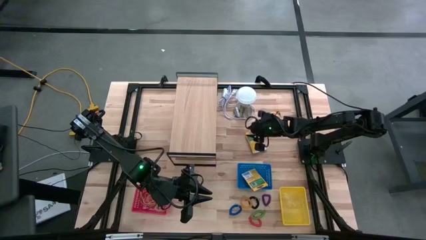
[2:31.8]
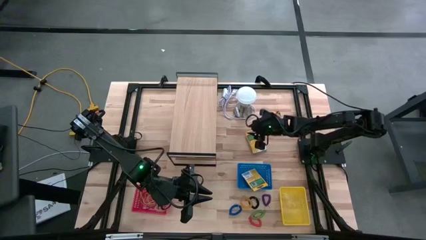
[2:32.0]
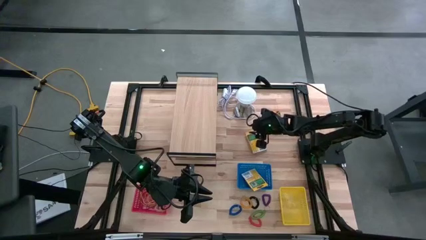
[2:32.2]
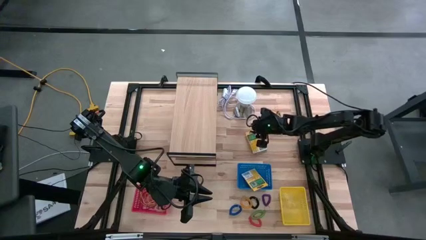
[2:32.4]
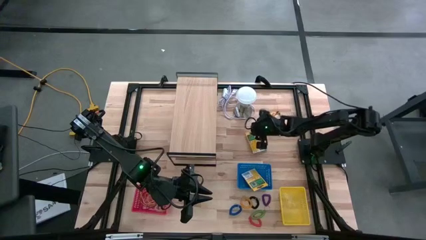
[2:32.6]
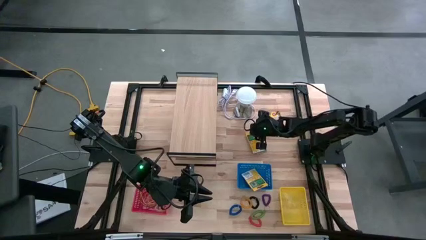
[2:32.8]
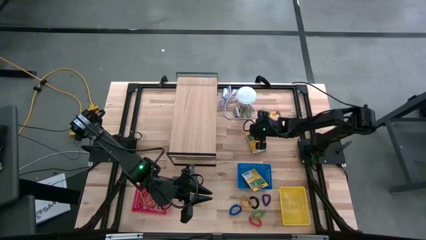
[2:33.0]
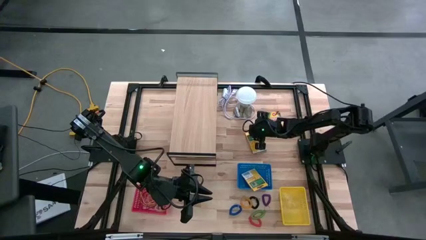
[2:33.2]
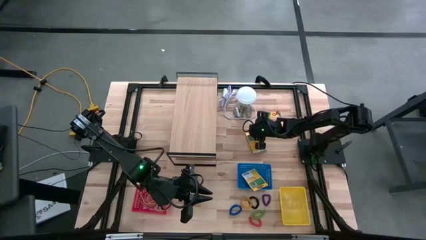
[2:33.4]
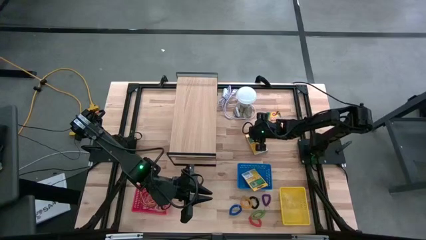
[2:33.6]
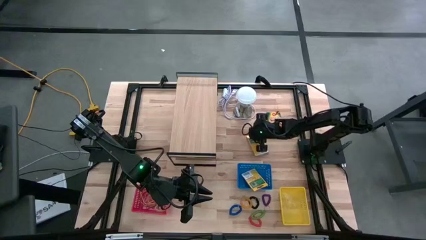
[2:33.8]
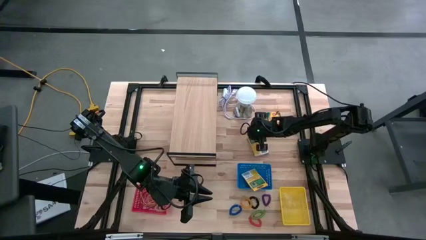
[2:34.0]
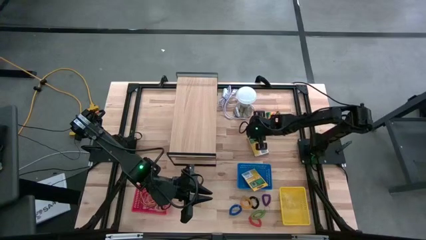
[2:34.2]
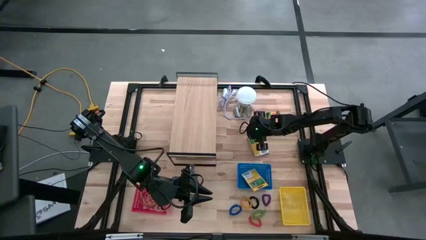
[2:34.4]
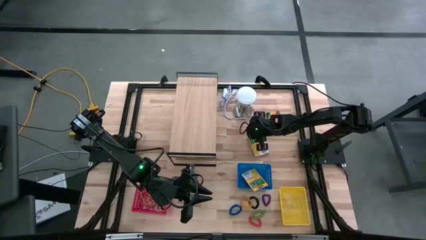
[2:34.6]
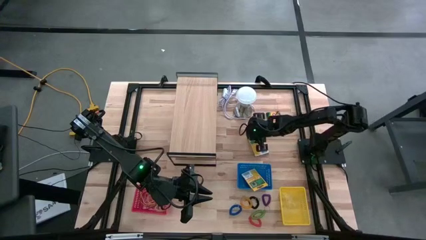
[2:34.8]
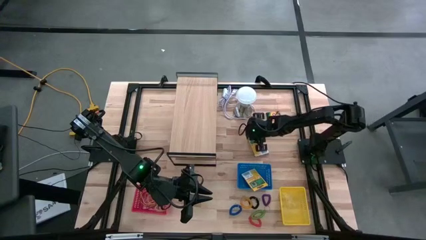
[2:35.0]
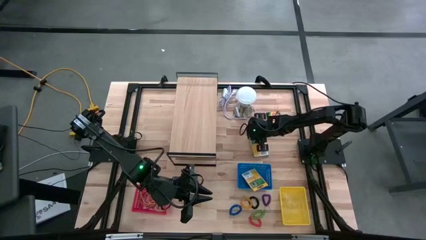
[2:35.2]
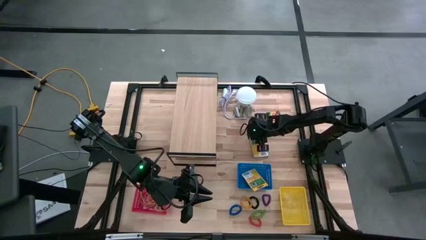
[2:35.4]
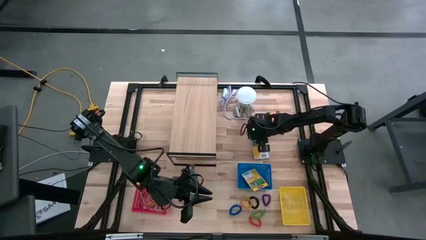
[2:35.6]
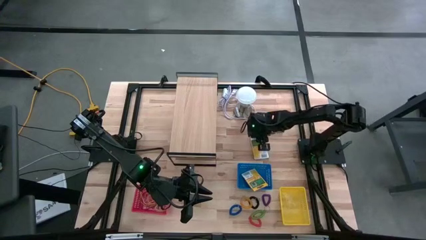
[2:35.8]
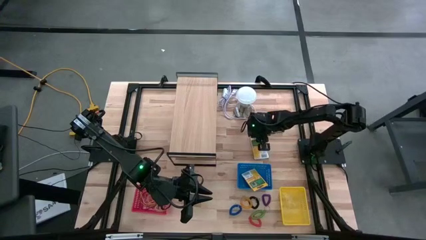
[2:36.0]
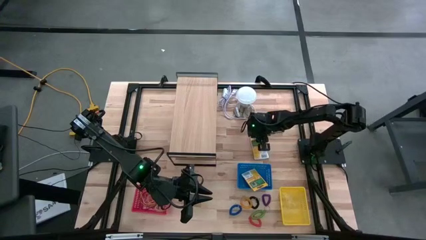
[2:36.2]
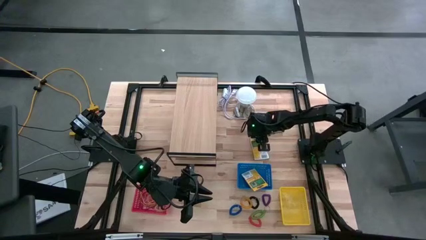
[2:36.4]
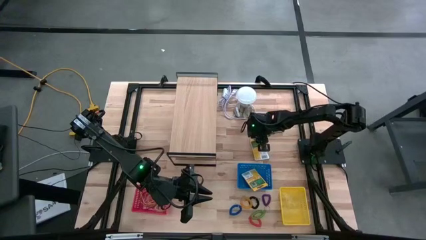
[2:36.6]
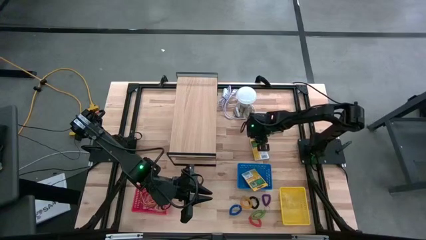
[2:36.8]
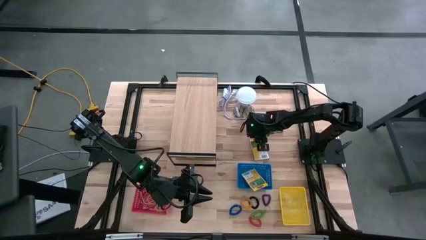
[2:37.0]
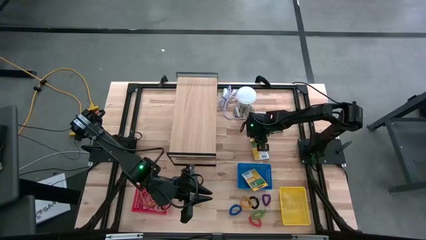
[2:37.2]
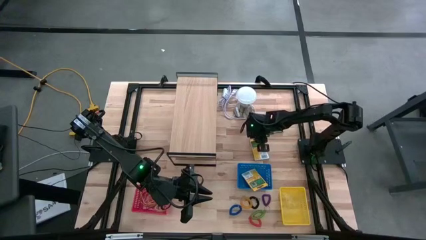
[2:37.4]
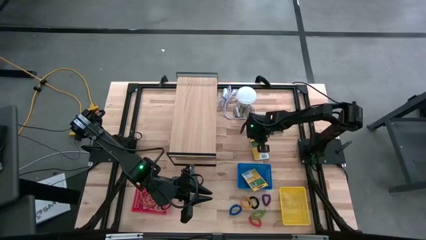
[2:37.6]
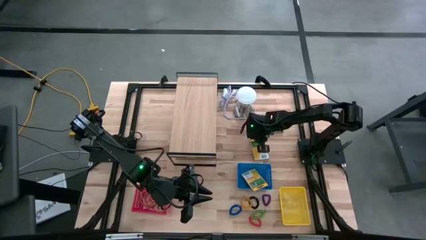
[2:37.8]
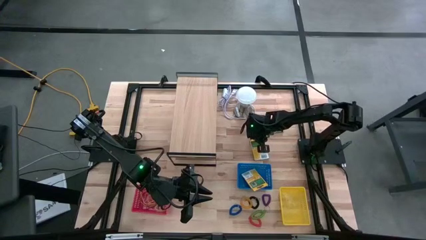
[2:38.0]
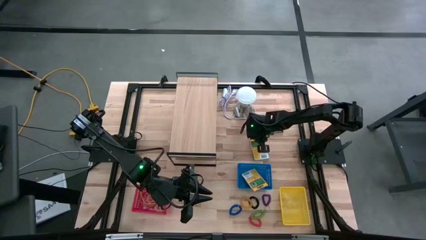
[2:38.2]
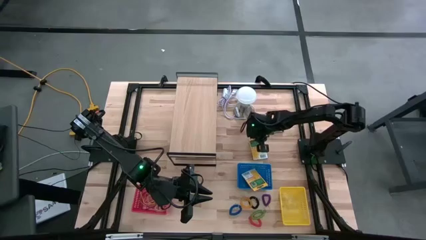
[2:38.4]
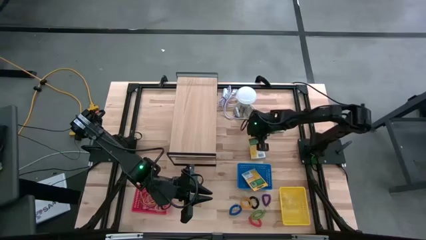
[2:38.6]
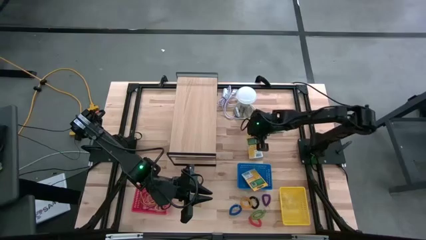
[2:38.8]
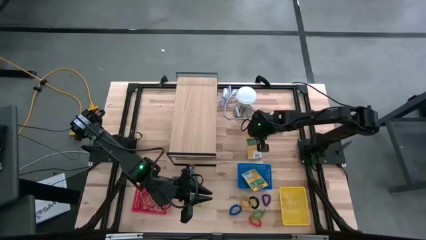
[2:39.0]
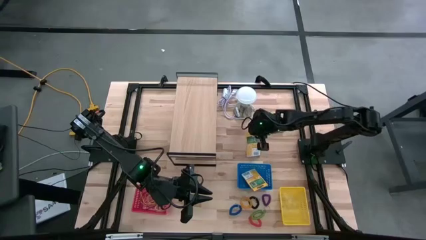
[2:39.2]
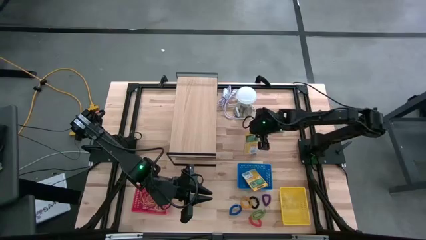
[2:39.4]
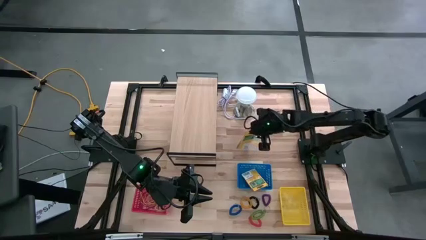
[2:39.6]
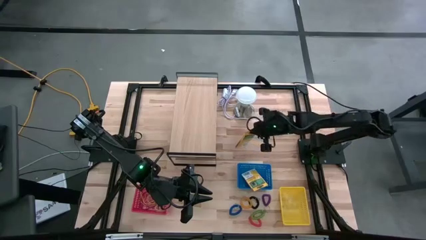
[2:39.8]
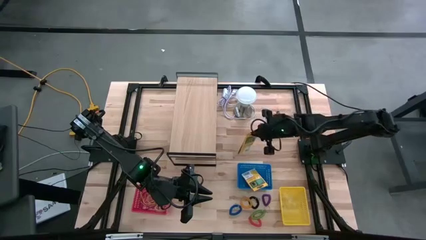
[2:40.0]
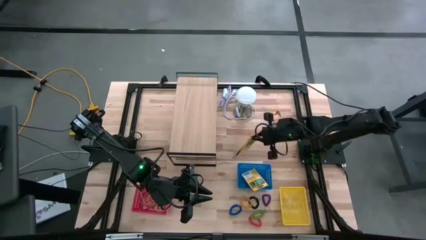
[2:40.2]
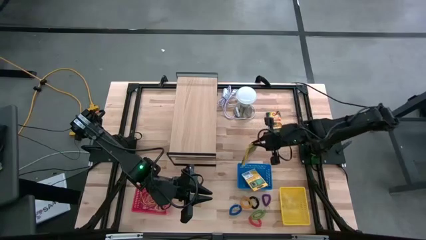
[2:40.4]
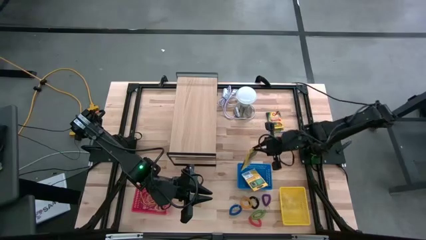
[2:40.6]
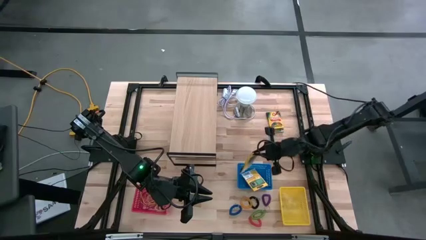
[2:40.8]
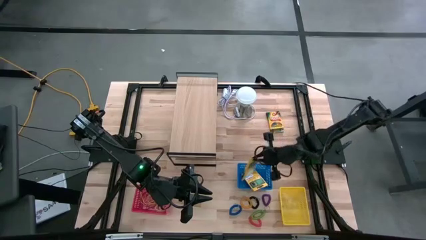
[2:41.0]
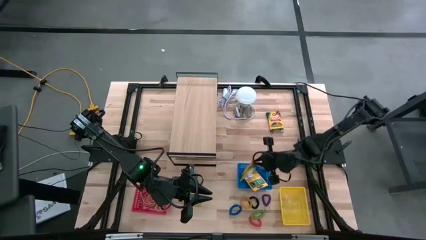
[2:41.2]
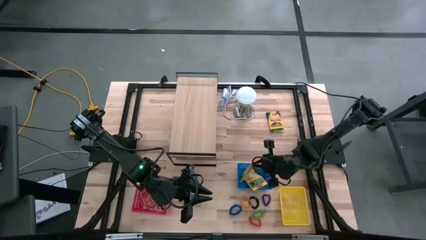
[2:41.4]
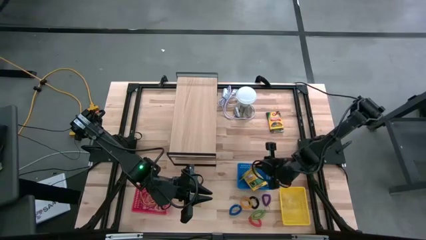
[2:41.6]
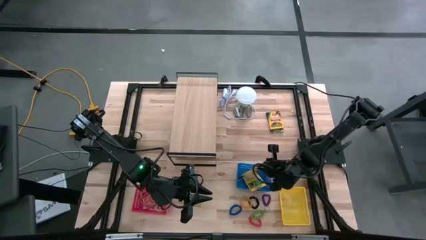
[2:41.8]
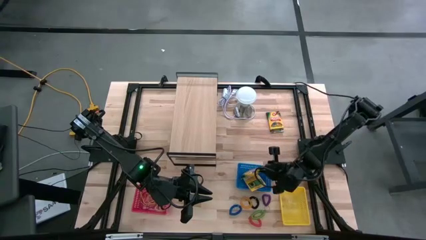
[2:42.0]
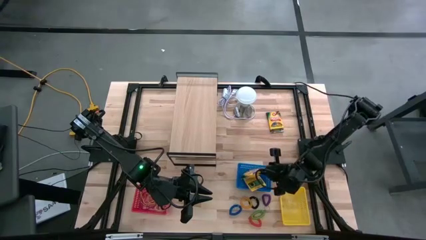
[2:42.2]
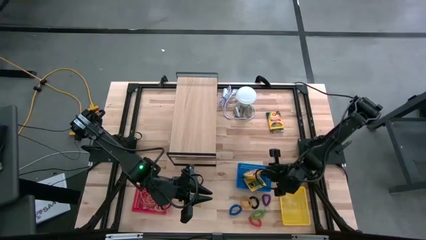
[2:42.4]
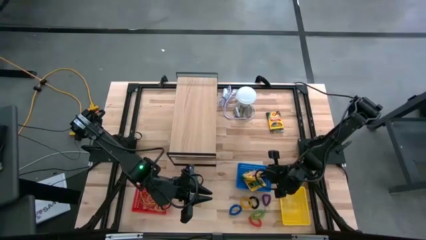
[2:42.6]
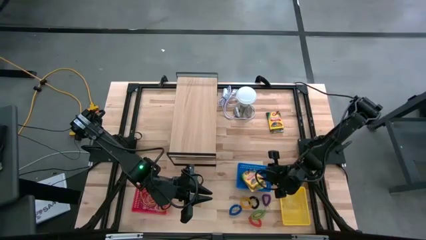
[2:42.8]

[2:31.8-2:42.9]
Task: Pick & Place Office Desk Supplies
Put the left yellow crayon box into the blue bin

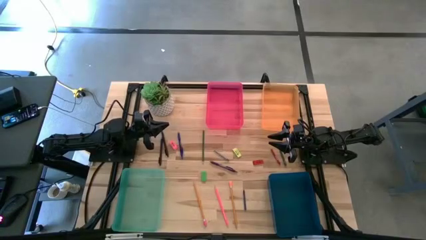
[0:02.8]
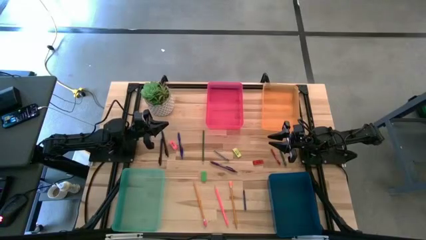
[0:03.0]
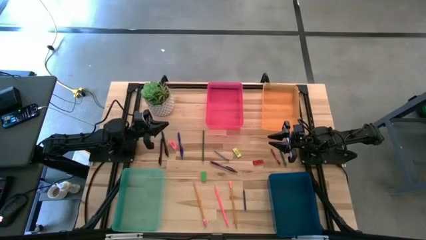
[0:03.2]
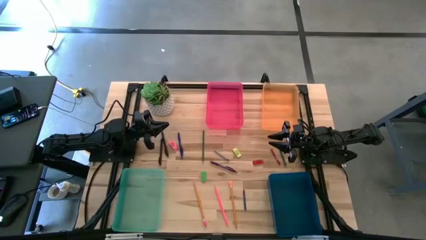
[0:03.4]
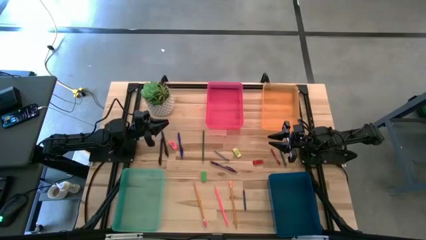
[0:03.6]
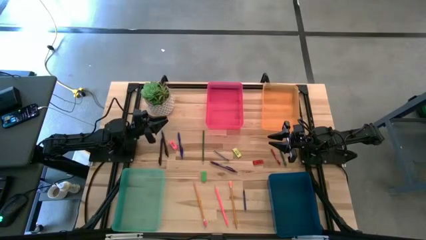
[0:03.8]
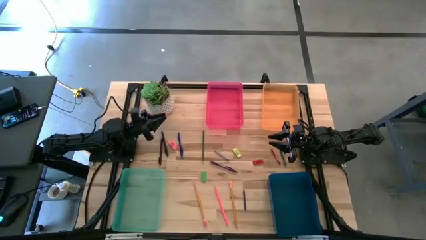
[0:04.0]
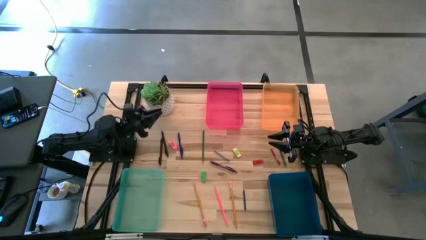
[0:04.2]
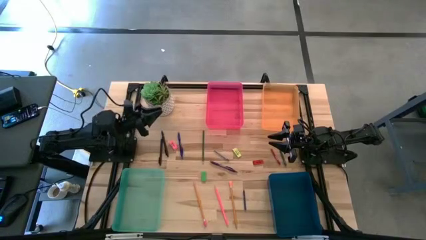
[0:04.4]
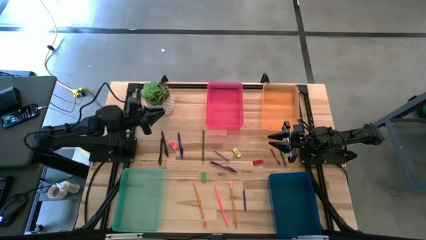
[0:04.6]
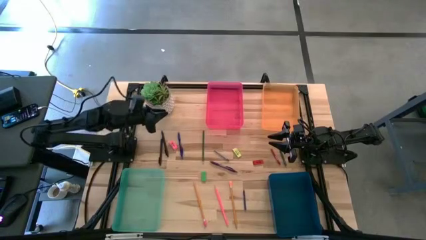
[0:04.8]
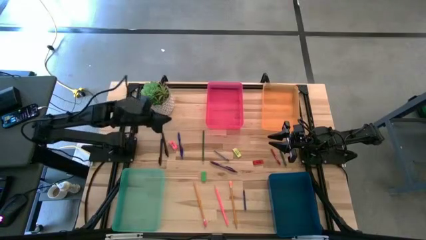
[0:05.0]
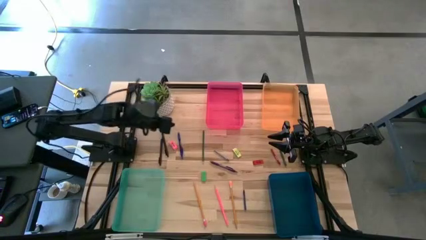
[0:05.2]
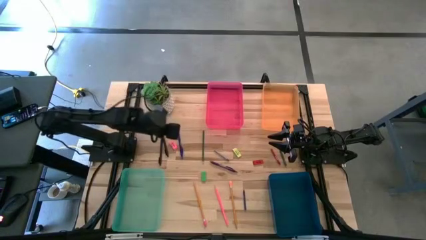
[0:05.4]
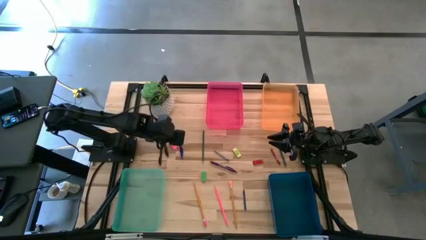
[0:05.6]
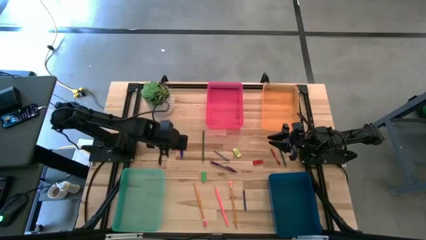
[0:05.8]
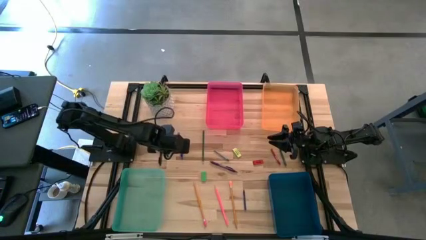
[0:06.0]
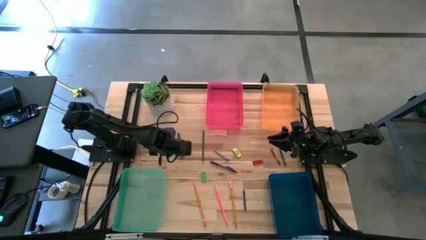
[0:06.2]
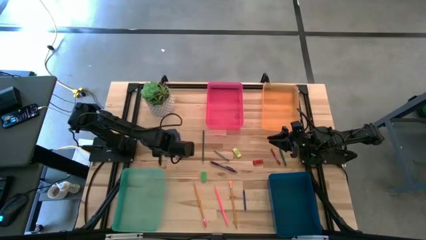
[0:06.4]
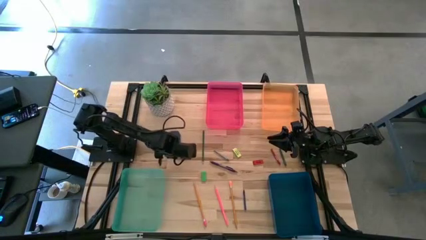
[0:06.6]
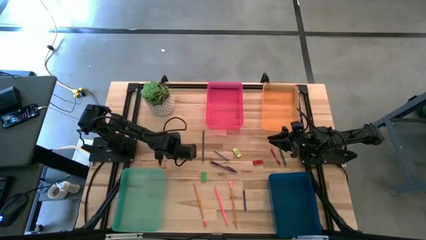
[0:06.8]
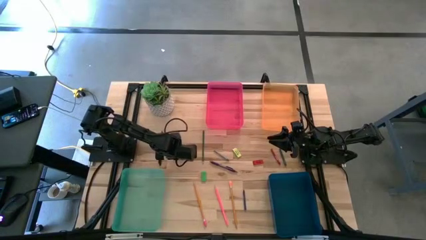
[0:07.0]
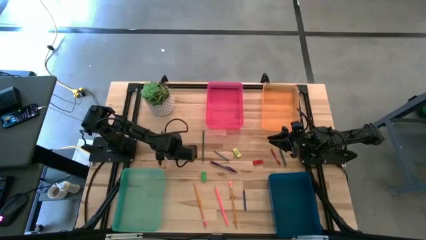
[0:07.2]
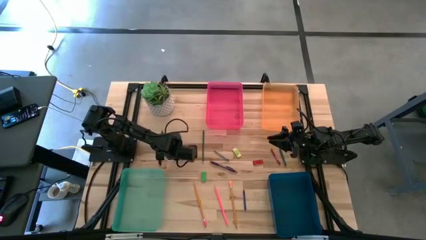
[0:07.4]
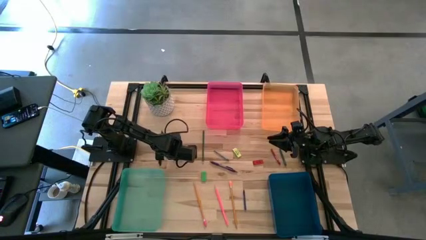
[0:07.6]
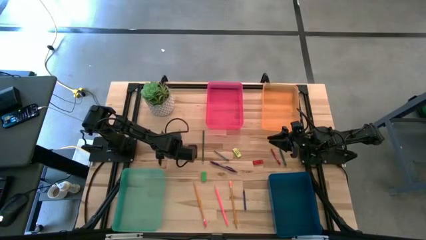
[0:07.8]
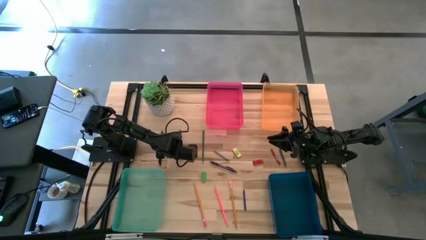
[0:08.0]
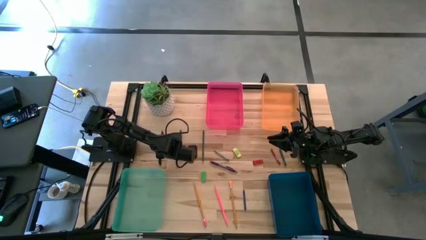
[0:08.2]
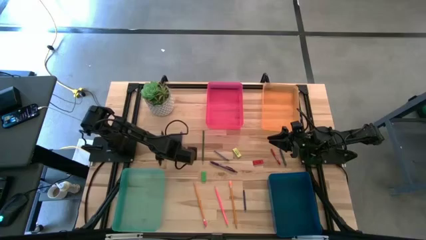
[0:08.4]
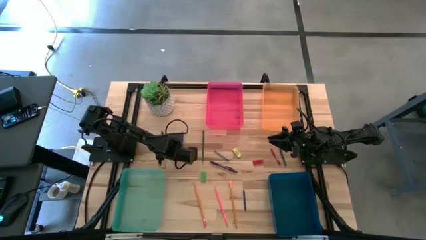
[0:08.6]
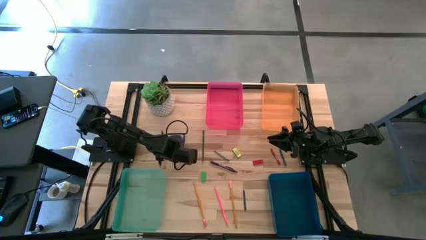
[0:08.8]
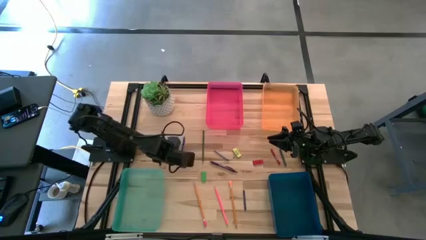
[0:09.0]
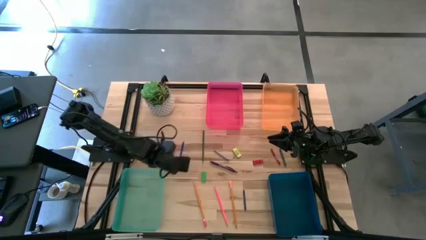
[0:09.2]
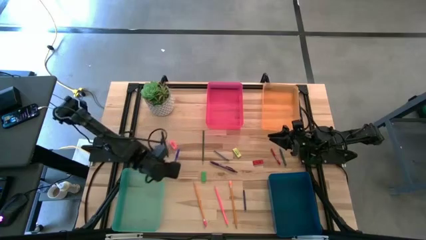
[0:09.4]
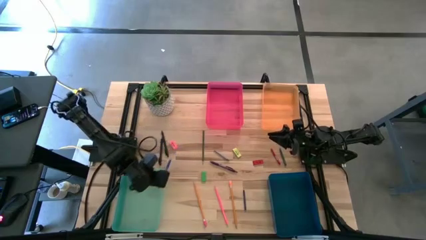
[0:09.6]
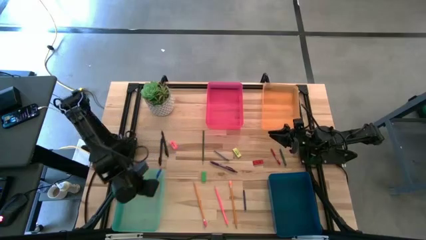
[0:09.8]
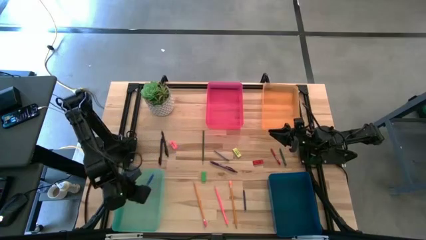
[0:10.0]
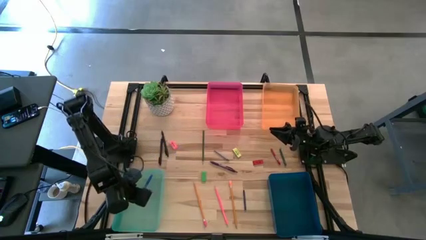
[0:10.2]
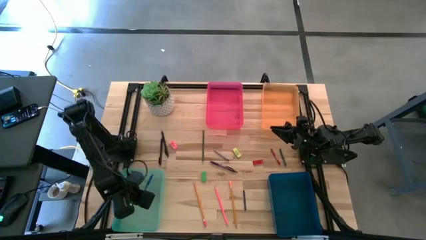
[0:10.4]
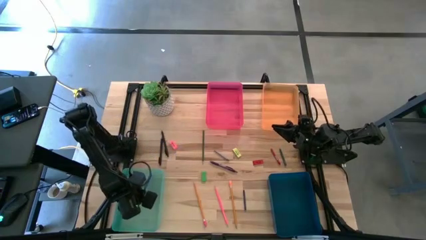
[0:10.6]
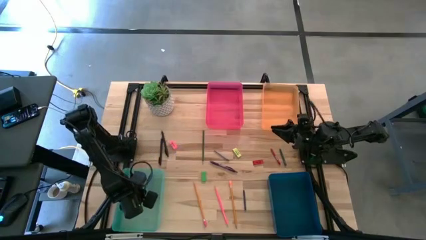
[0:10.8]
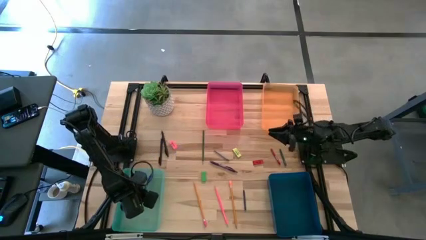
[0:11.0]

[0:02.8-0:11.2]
Task: Sort crayons/erasers/pens/pencils in bins
Put the blue ballpen into the green bin
